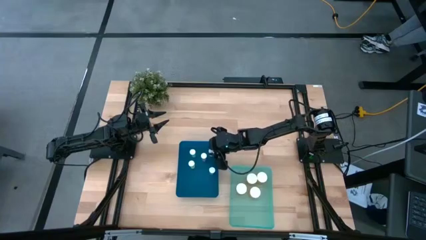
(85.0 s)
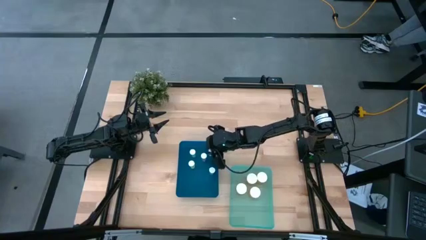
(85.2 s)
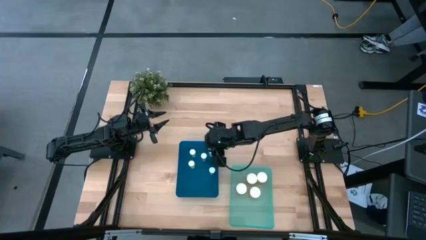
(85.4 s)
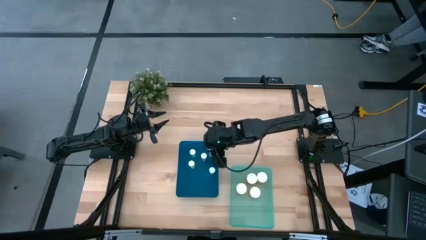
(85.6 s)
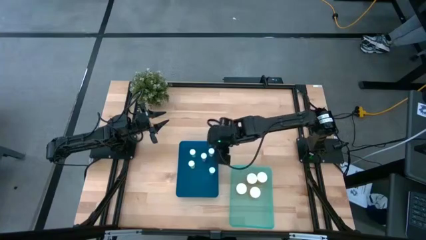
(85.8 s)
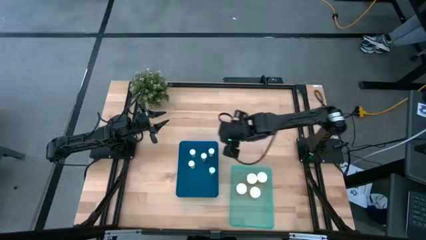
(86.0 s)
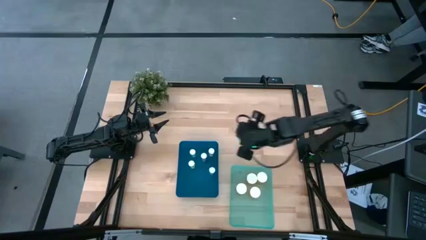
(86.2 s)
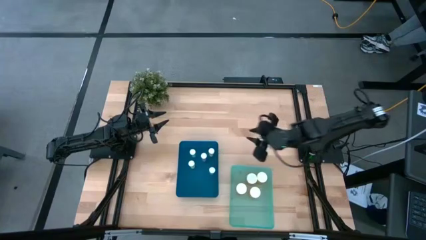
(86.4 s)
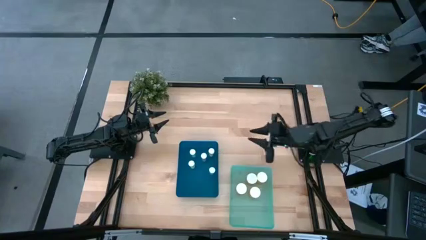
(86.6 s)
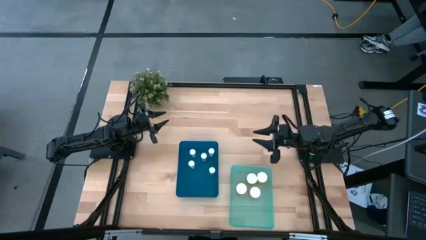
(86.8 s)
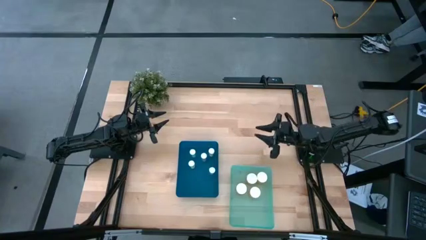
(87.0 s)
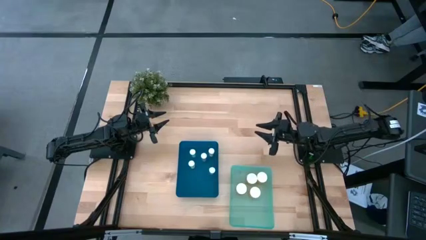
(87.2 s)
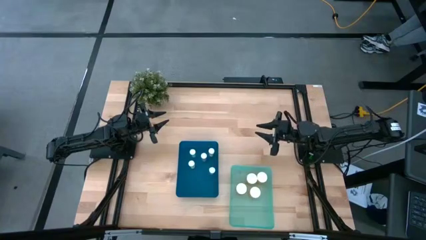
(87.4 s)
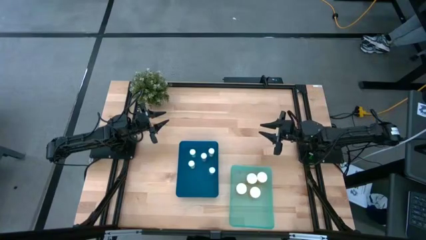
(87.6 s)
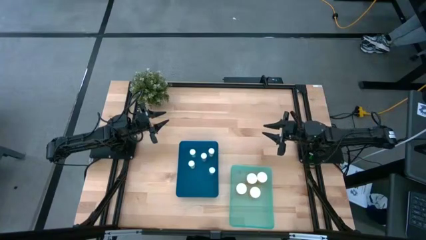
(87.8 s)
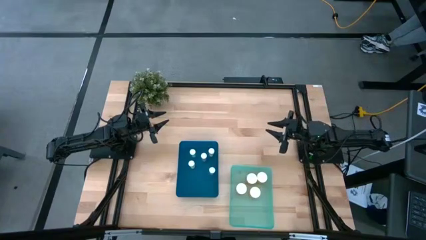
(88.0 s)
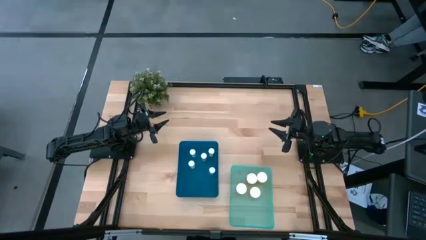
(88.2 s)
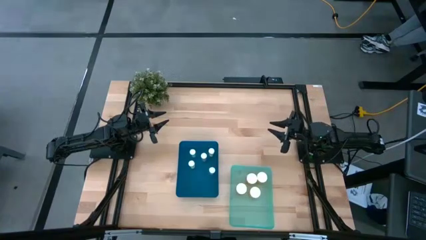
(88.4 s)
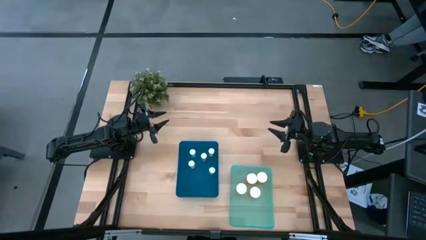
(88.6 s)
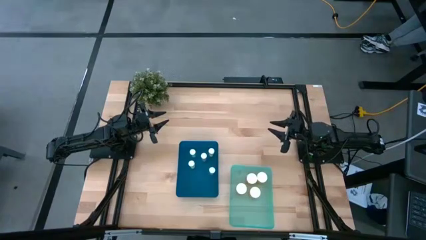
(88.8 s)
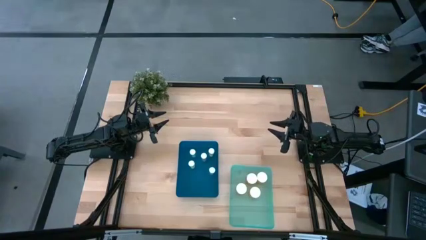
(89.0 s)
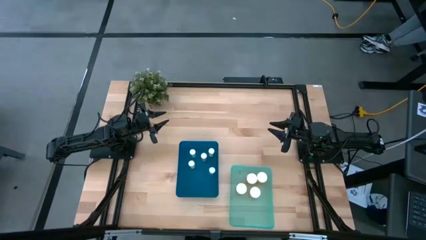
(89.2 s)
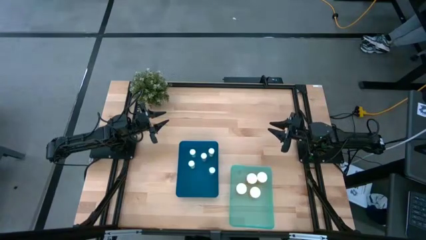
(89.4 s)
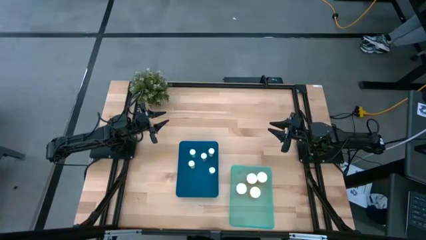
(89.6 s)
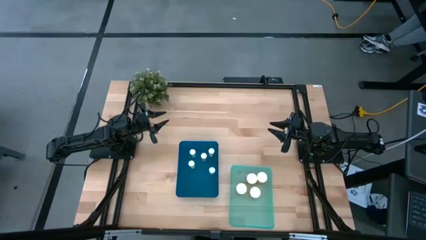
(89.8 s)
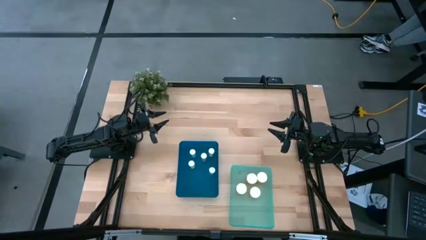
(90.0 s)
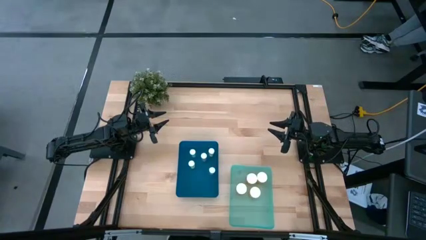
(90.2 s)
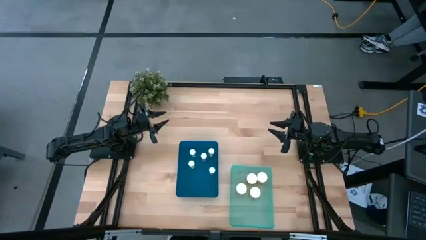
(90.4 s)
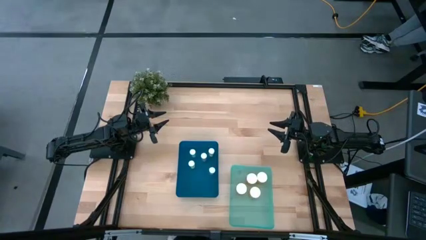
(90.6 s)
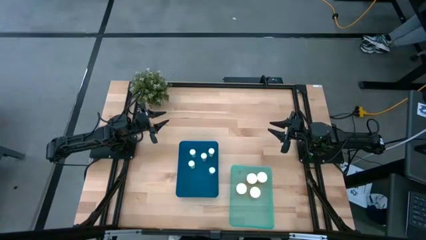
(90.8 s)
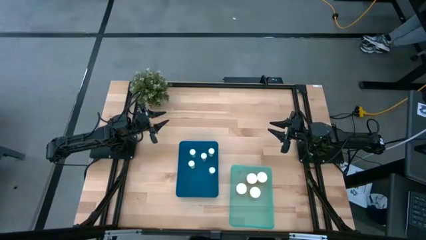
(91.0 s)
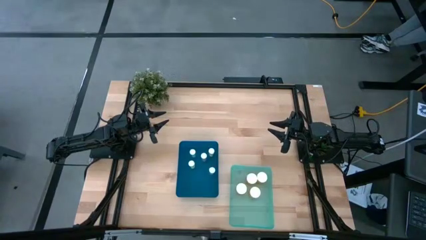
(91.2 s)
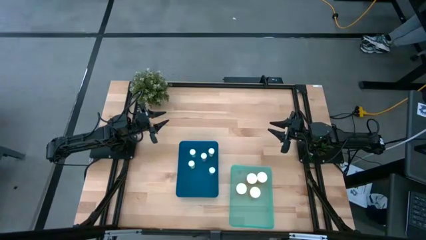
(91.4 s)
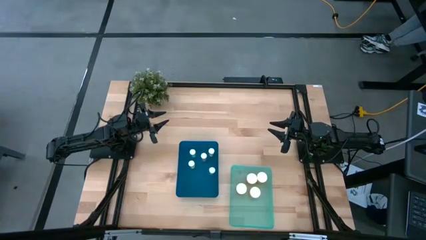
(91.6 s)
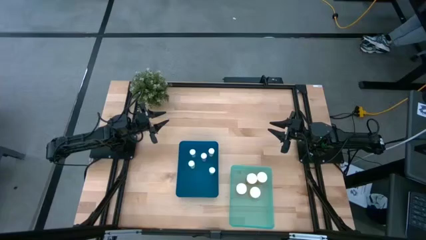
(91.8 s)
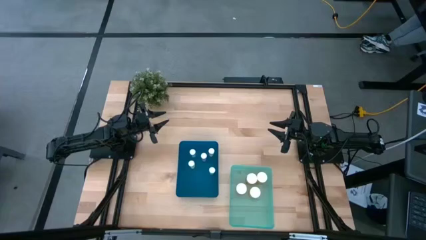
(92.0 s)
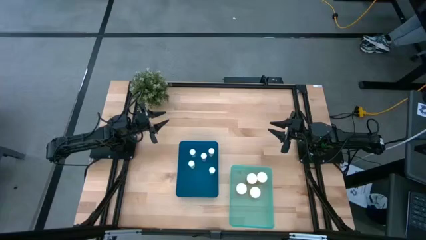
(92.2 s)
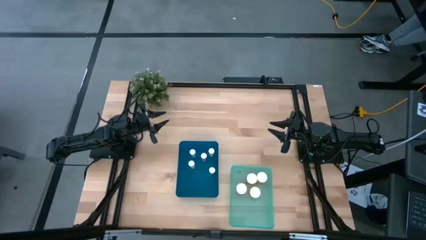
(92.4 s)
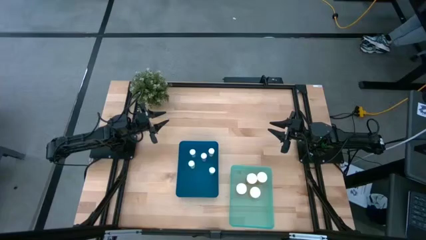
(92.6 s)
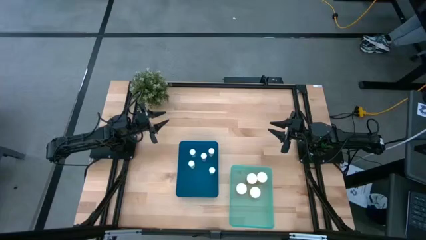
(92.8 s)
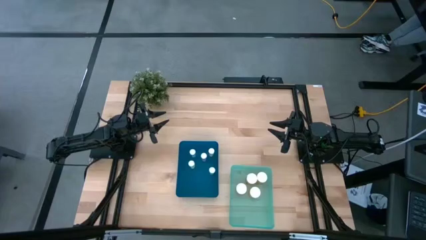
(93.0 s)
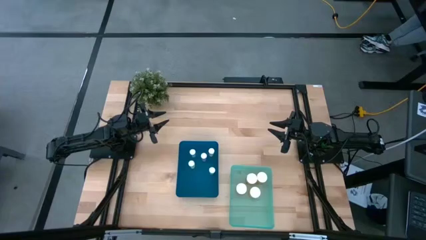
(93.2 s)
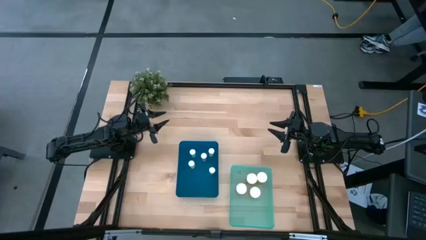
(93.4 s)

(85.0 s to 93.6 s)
Task: Pick and place medicine bottles into bin by pill shape (circle, oval)
Return to Home Position
